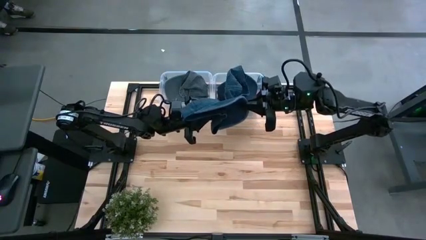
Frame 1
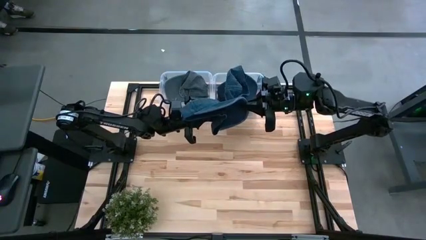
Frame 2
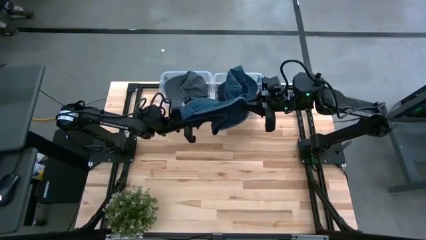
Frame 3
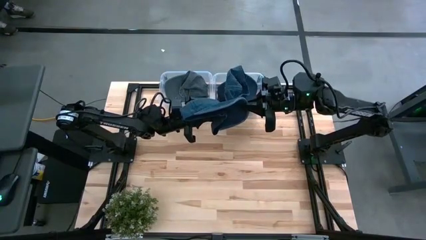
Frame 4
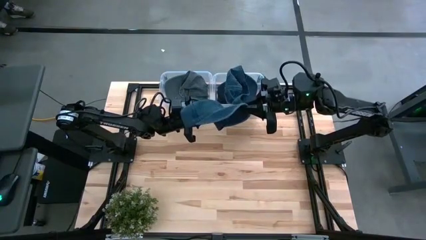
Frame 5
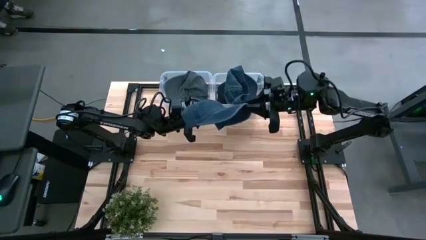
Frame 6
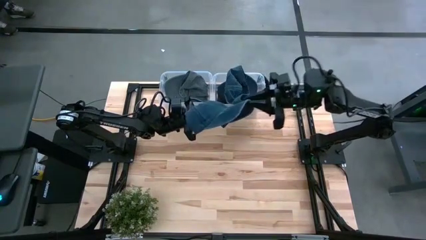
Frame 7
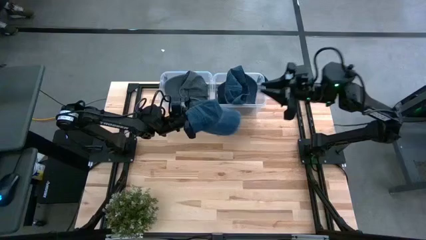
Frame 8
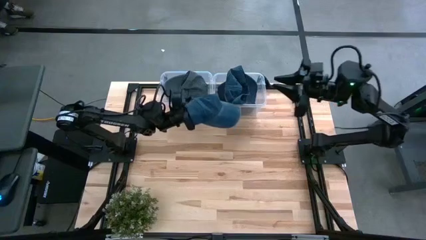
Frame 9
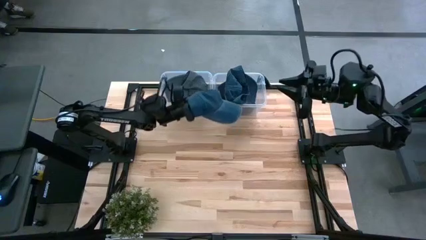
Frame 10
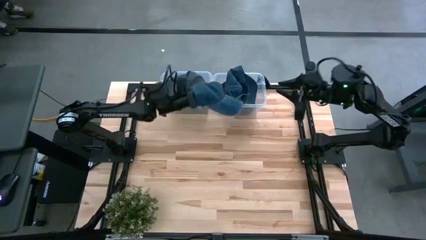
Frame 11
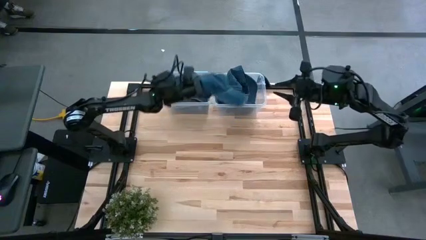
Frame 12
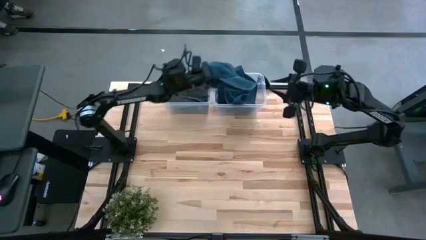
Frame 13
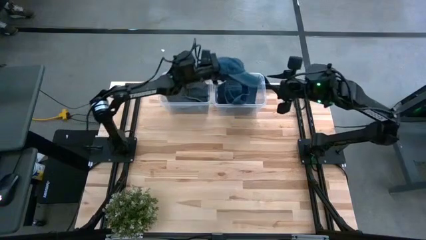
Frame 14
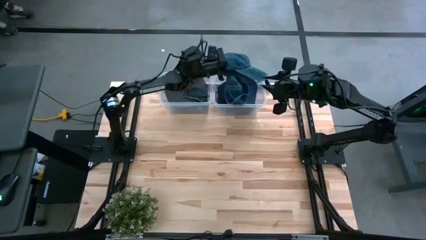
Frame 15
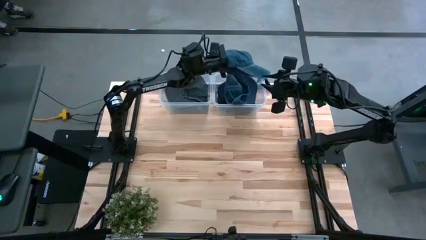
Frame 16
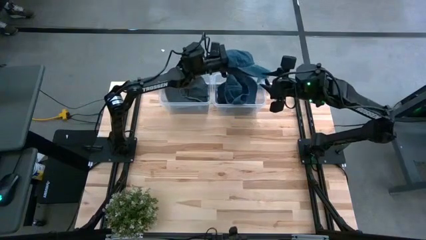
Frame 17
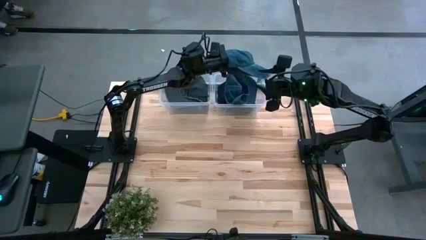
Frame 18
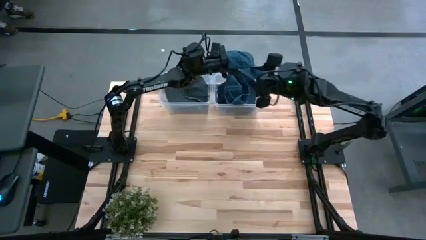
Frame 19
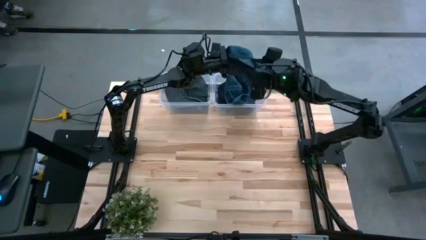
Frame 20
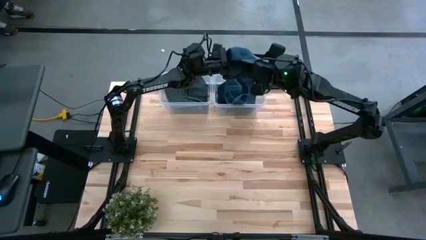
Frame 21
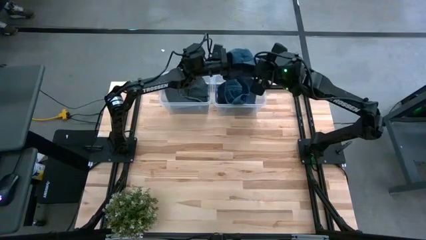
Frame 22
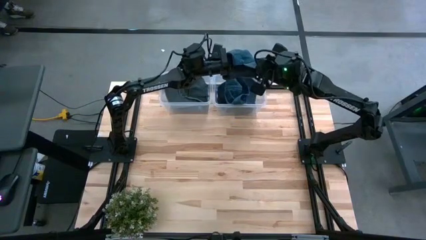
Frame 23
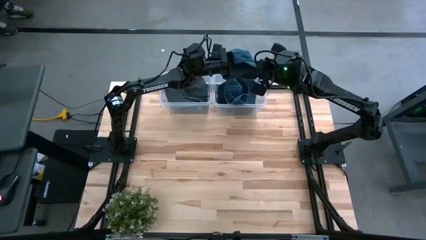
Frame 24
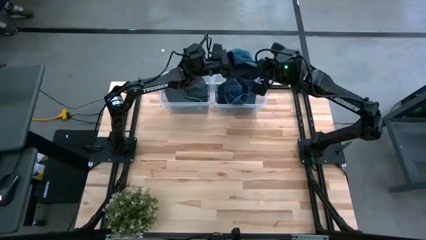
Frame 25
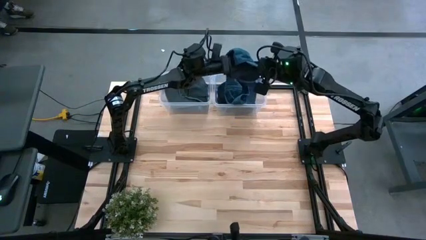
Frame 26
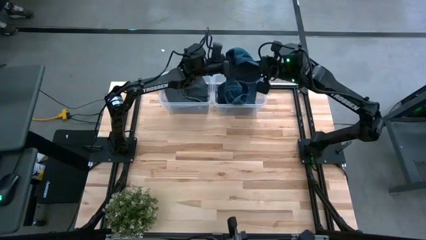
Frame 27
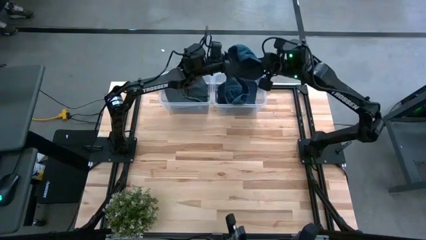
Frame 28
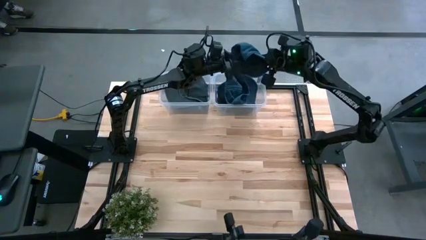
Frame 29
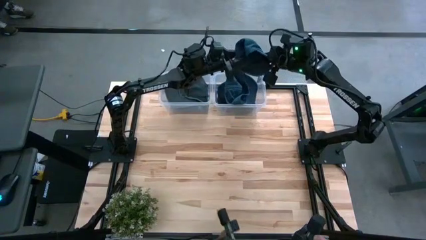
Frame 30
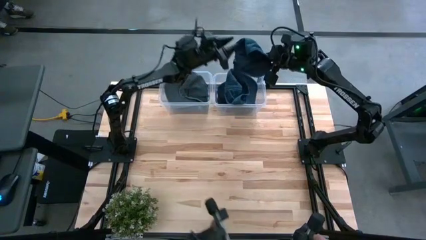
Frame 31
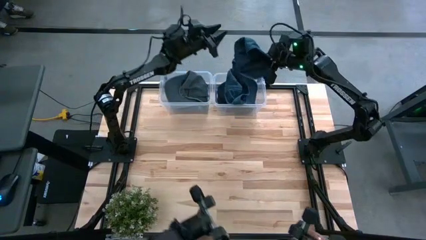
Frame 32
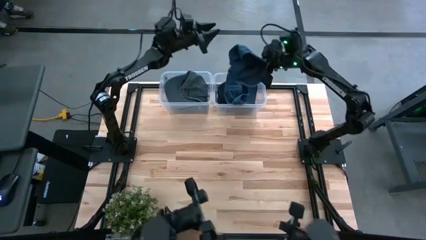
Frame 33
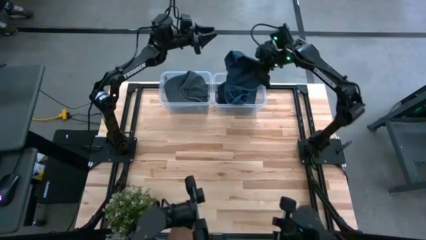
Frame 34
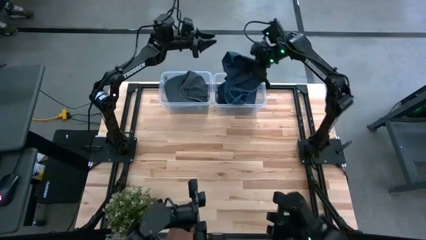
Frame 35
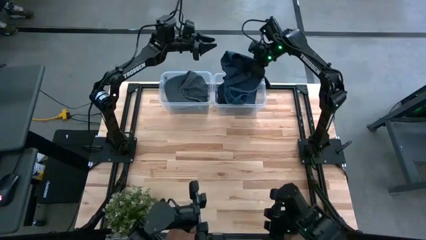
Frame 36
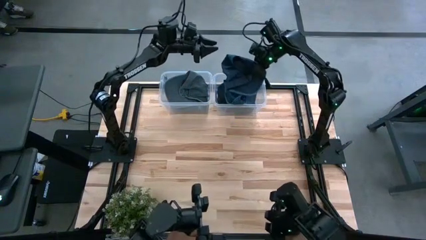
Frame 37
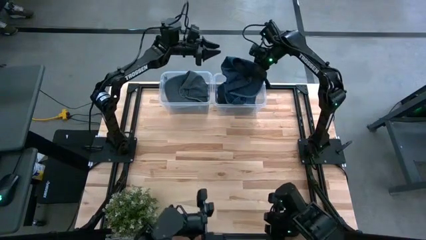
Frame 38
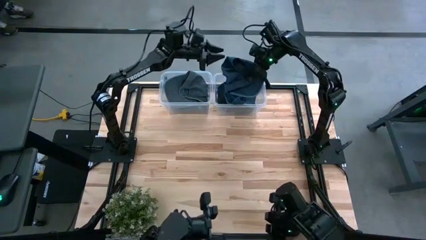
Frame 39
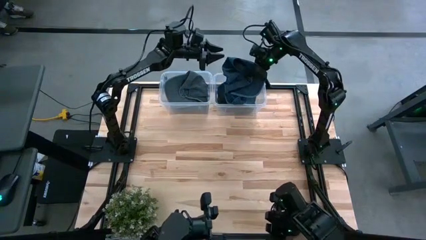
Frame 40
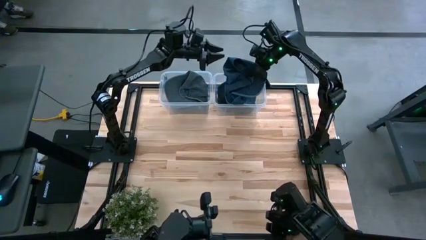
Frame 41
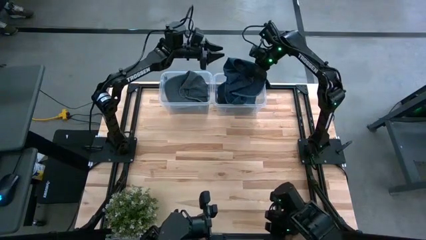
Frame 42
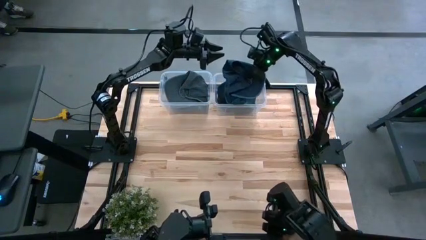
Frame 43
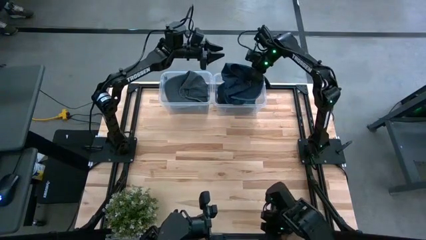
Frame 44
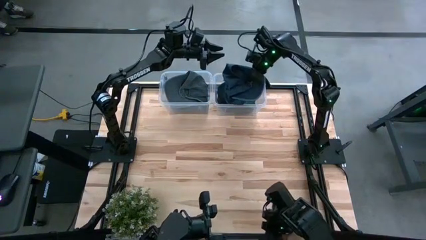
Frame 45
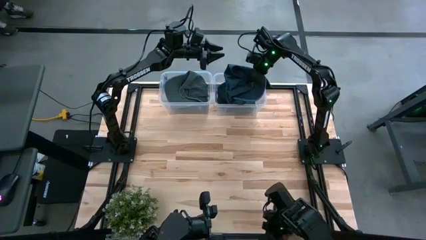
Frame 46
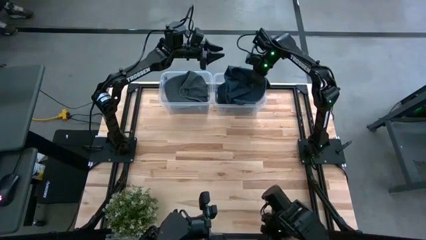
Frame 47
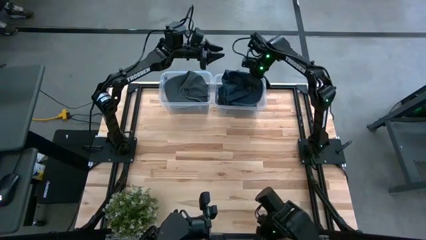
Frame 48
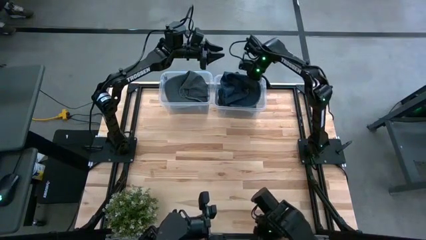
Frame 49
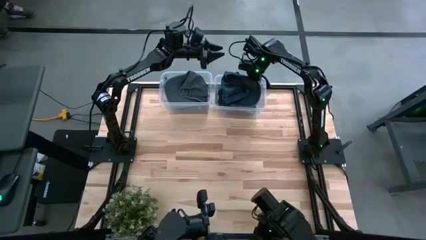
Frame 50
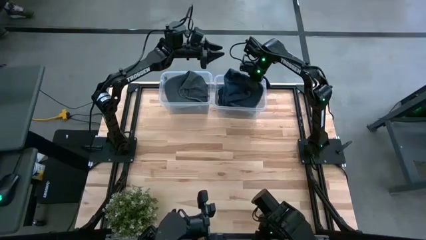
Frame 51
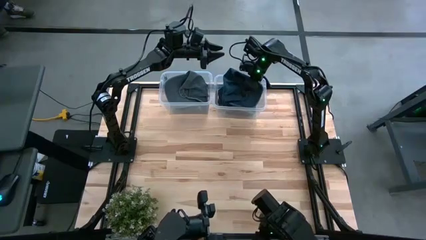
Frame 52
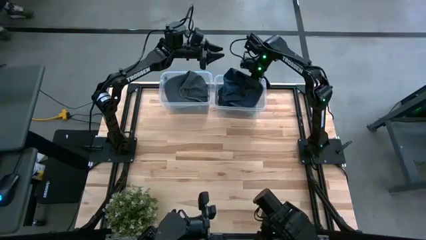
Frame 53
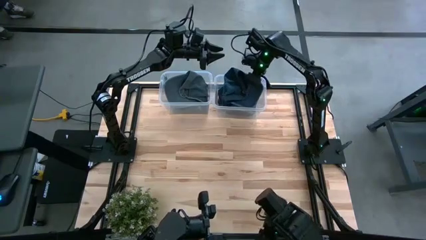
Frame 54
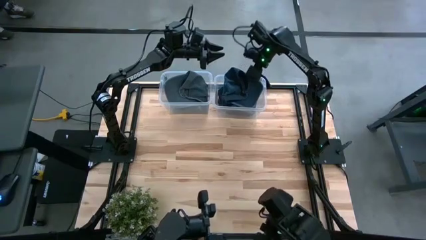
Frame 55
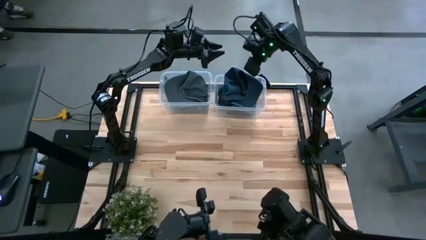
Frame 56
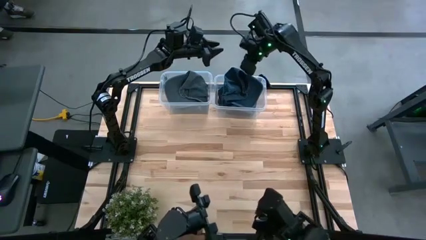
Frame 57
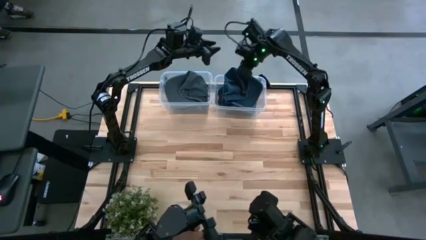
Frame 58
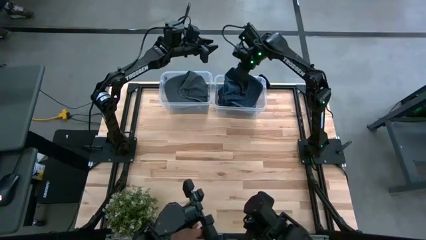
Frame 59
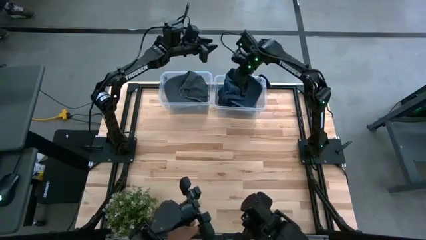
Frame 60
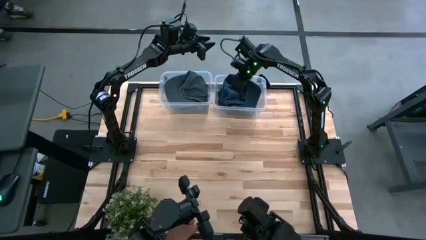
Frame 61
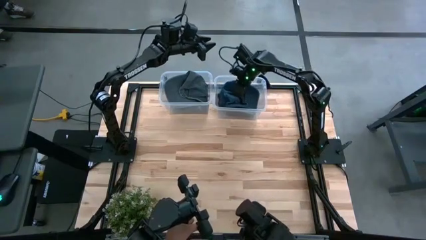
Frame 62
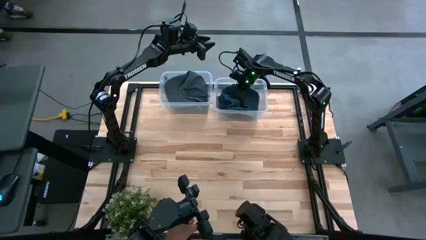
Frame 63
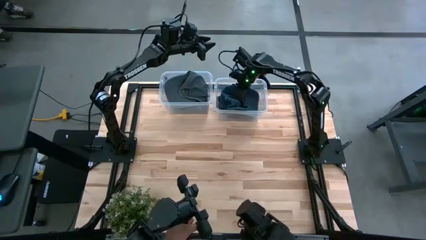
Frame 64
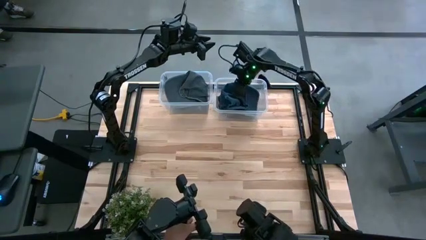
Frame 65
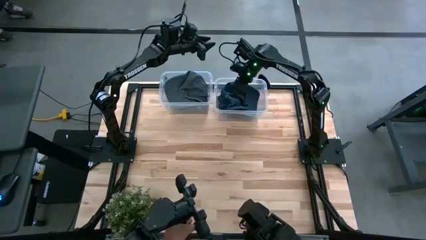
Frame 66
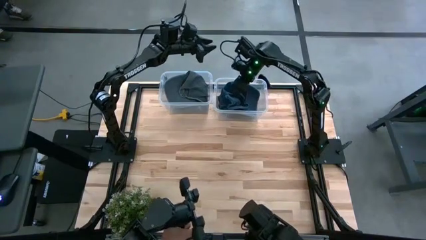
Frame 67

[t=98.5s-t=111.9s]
Task: Pick & Place hat
Put the blue cap into the right transparent bin

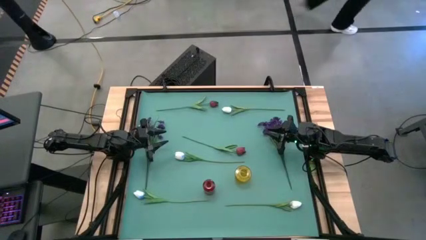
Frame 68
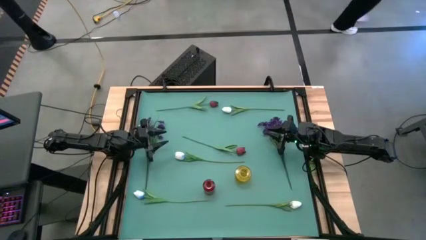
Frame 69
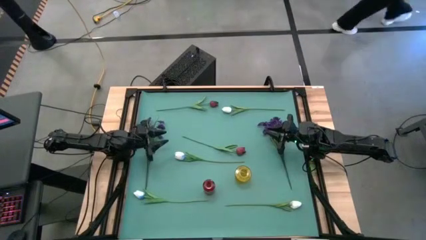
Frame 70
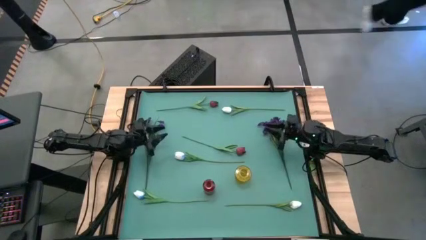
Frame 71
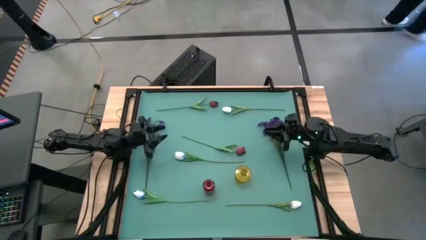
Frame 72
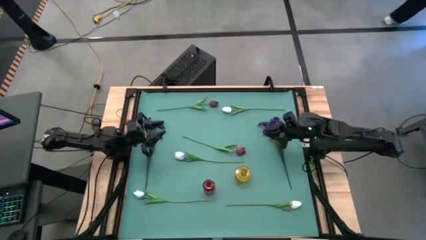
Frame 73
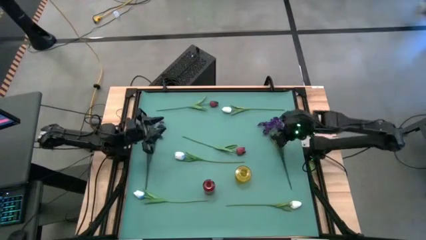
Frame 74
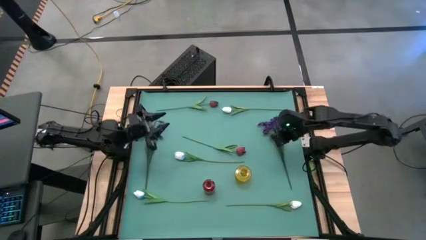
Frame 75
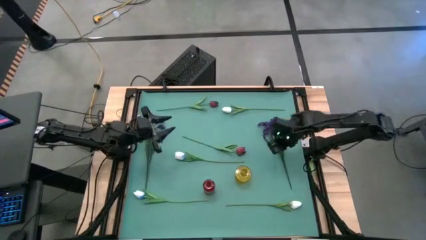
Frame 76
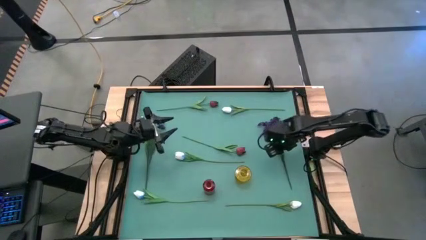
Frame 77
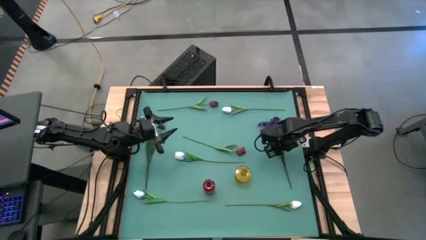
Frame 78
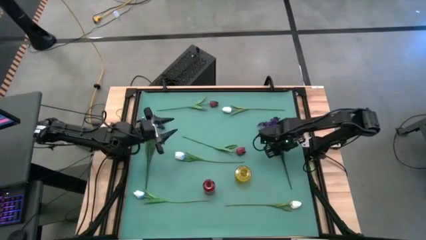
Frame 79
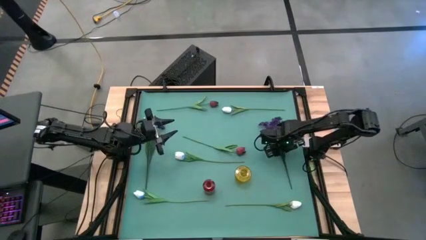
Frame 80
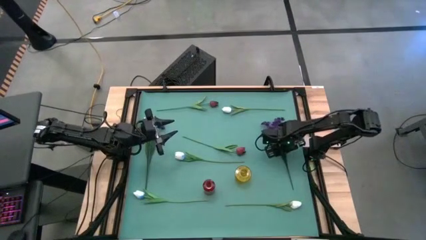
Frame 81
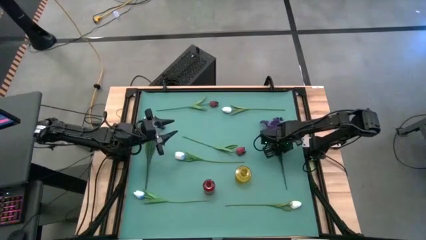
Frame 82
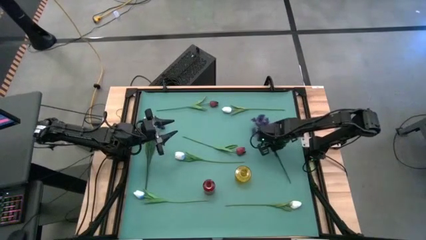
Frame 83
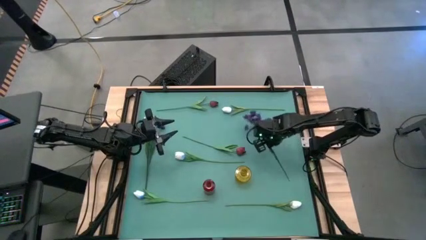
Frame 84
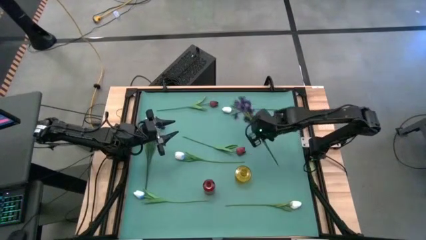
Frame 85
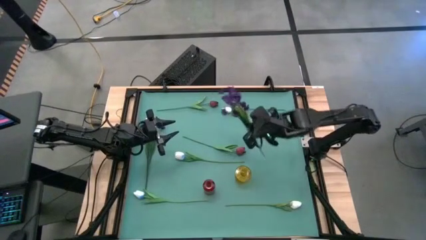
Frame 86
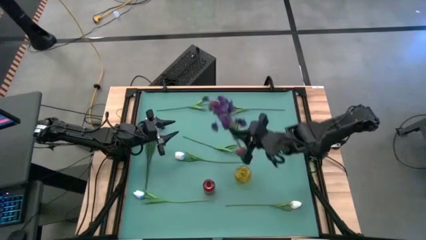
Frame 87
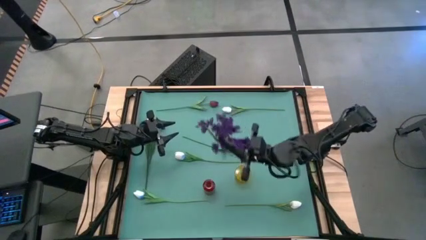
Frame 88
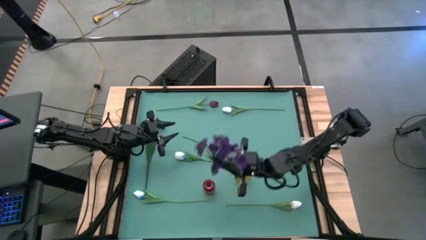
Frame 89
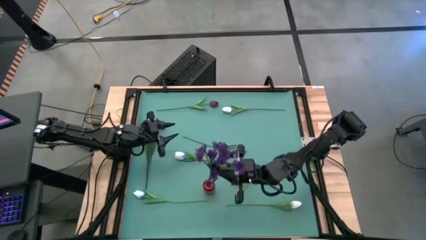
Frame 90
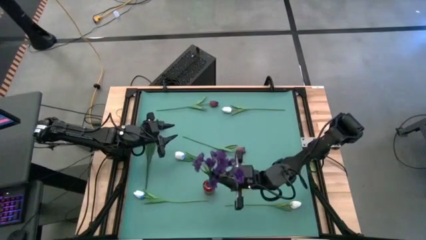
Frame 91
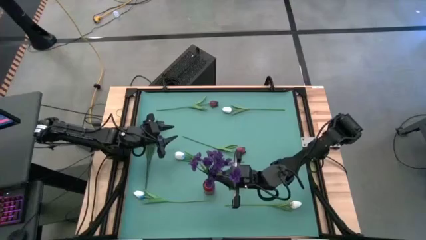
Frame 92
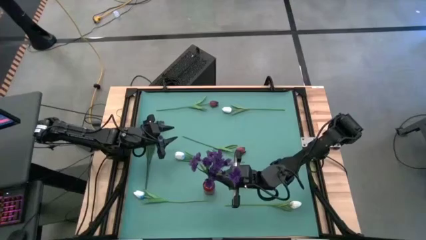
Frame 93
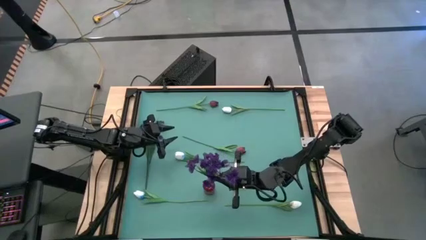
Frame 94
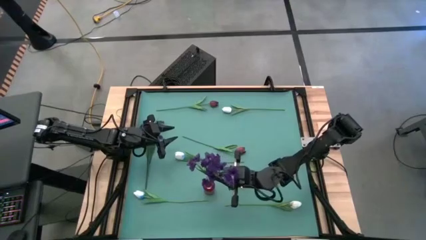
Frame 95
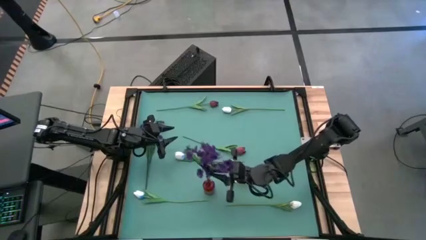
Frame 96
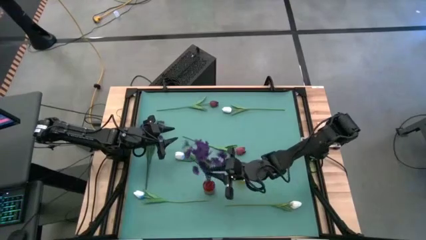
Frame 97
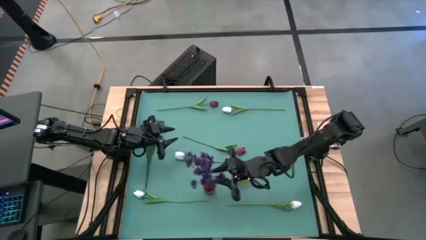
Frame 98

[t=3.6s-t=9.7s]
Task: Sort flowers into vase by color
Put the right violet flowers into the red flower vase
